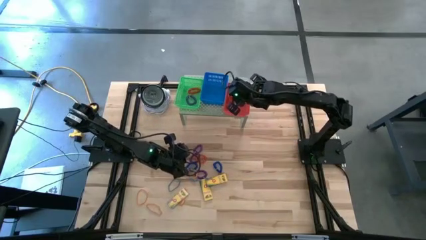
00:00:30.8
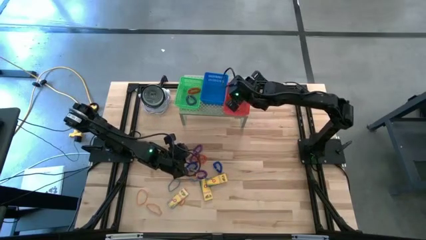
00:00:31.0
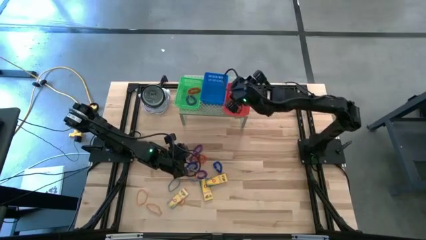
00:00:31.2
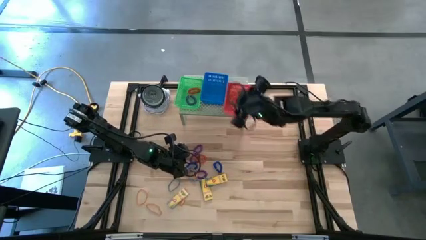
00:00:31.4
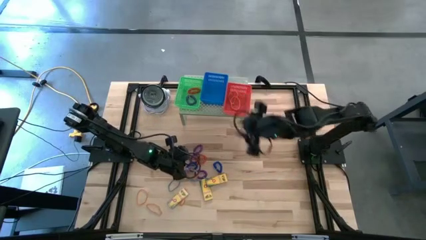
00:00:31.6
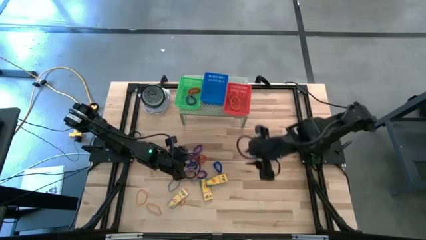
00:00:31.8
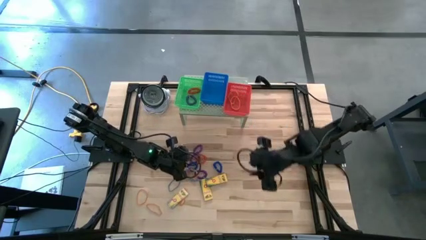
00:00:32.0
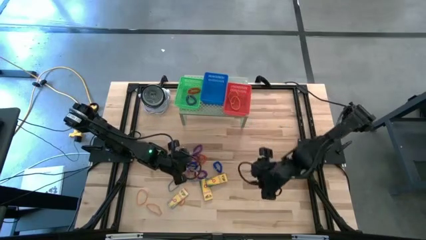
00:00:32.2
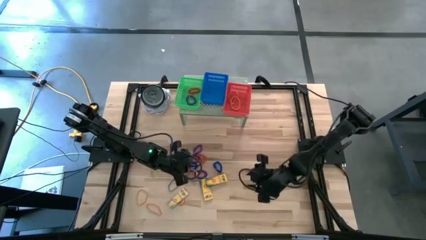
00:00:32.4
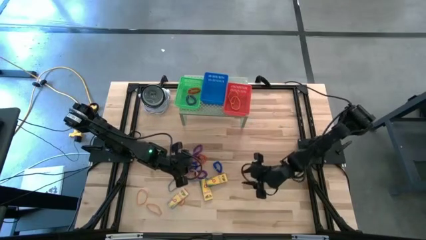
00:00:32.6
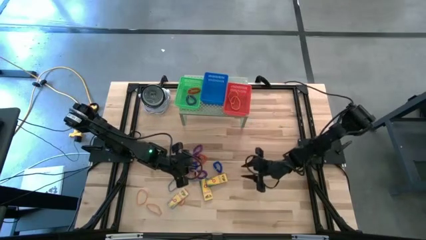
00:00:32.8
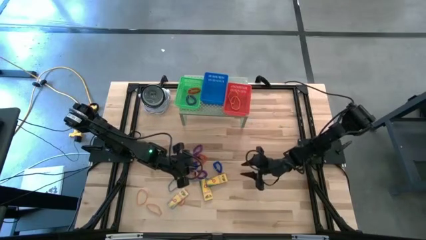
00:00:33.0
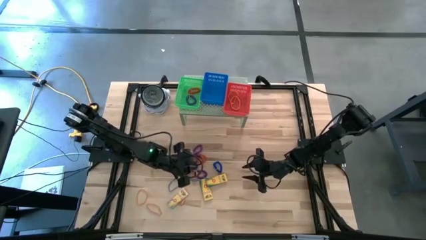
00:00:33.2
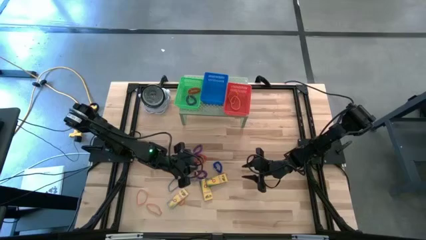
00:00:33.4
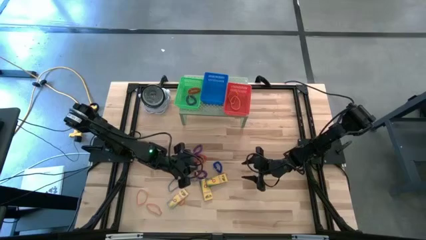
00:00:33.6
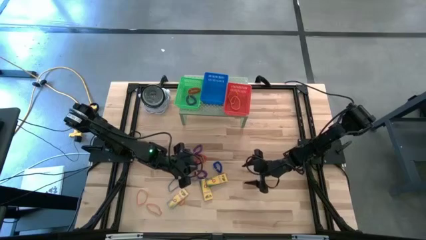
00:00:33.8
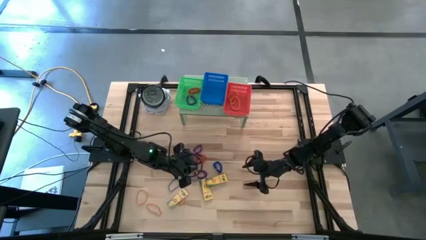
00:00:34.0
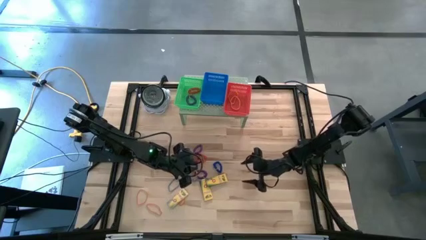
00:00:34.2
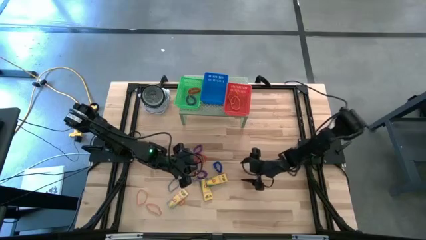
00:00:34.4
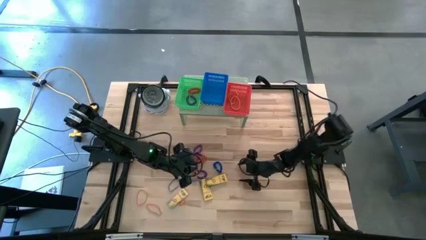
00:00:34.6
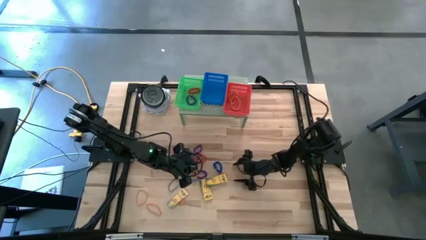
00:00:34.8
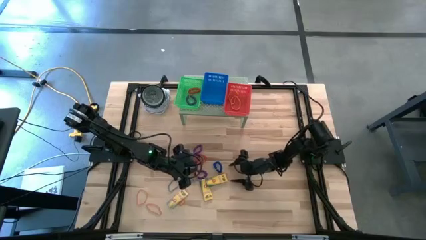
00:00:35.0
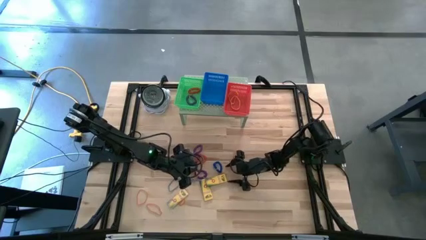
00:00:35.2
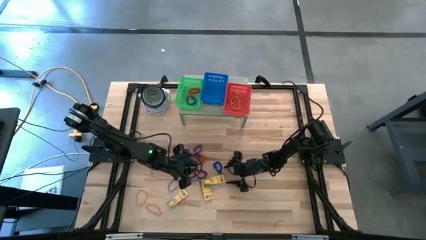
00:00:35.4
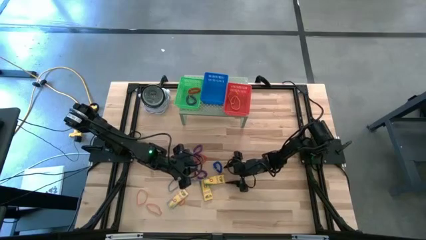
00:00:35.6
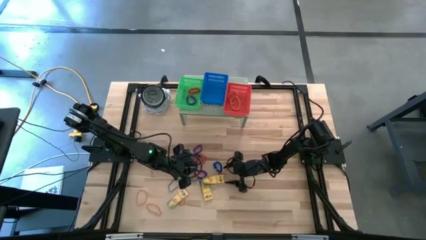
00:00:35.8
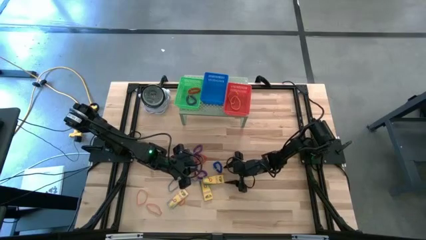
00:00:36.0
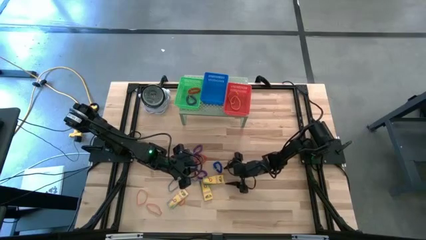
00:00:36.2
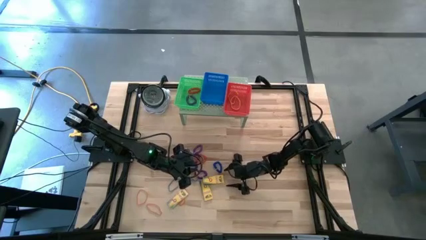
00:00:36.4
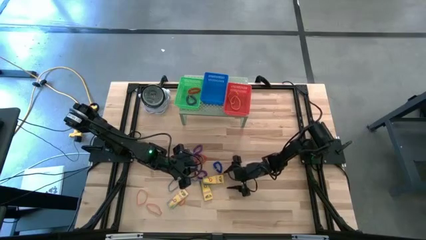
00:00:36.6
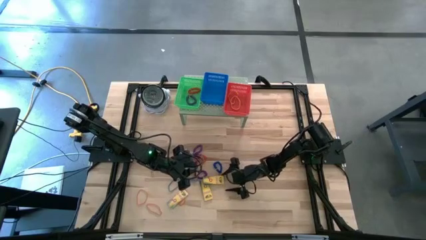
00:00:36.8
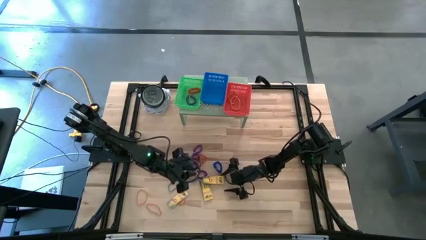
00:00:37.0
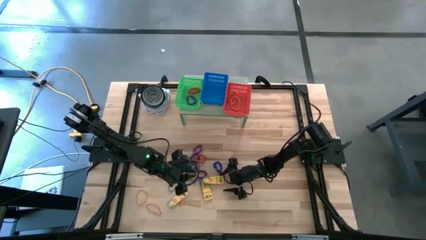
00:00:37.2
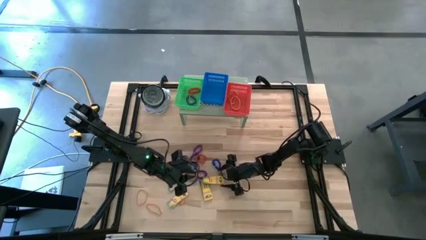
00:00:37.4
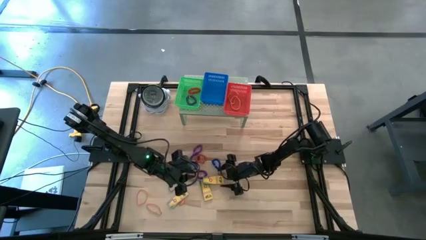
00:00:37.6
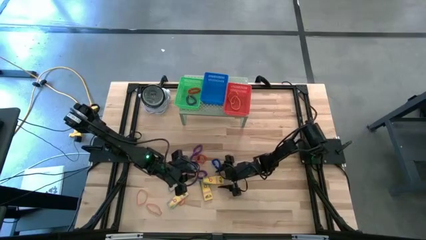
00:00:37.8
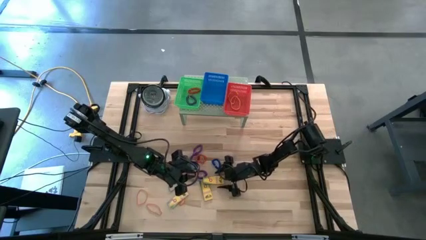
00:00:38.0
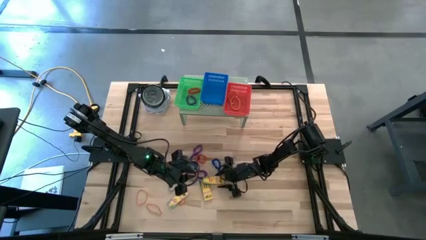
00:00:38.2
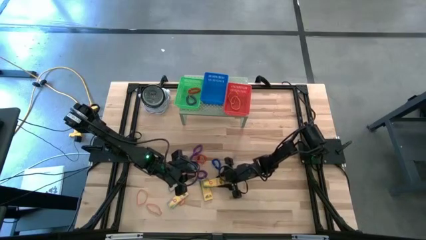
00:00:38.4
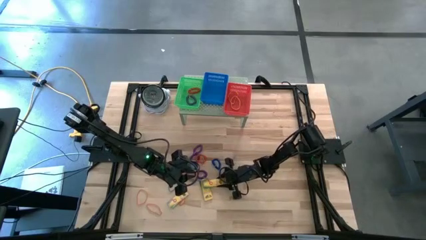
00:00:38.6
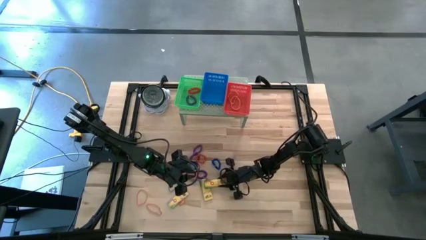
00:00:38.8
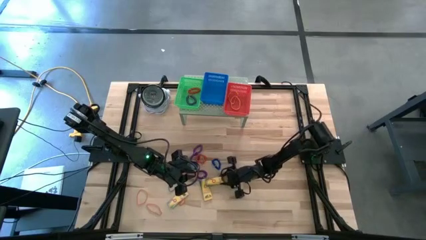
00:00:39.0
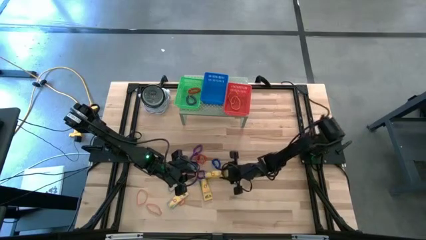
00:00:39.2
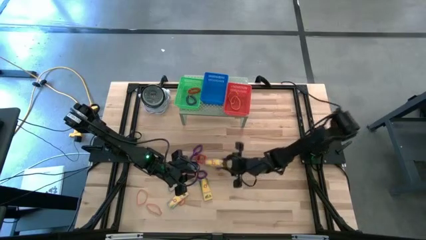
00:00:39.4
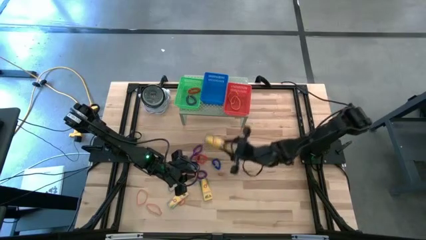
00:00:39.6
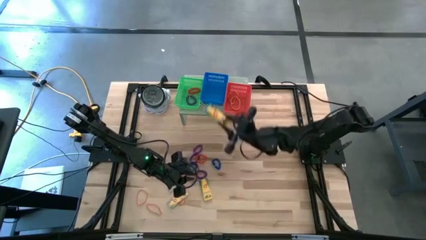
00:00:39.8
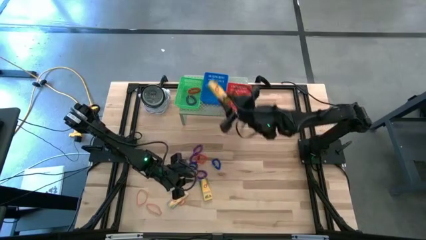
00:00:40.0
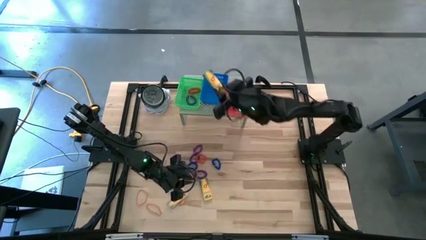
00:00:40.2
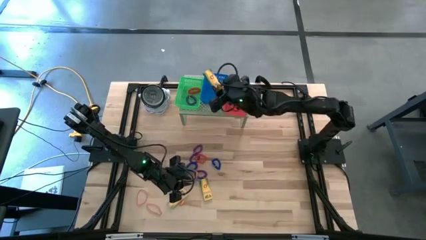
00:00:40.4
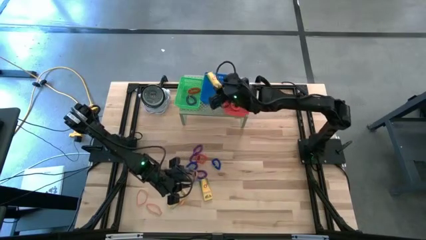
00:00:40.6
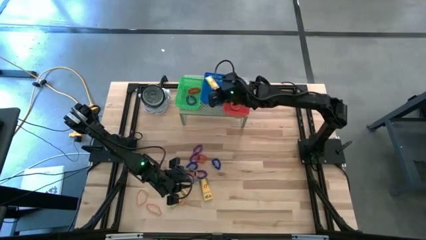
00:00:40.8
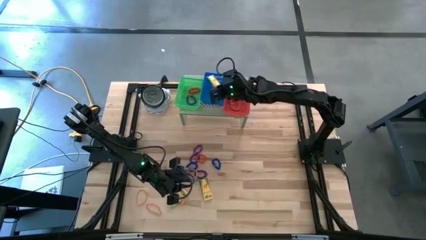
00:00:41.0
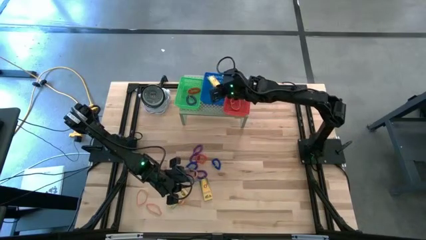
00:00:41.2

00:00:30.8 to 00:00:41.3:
Task: Pick & Place Office Desk Supplies
Put the yellow crayon box into the blue bin on the shelf

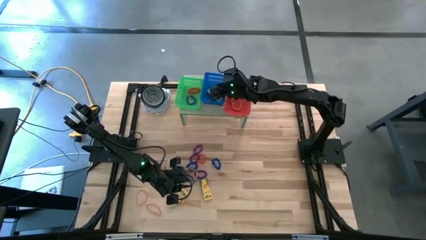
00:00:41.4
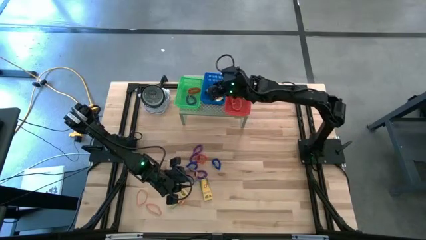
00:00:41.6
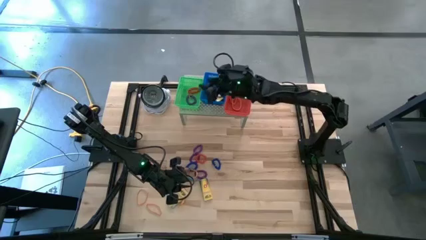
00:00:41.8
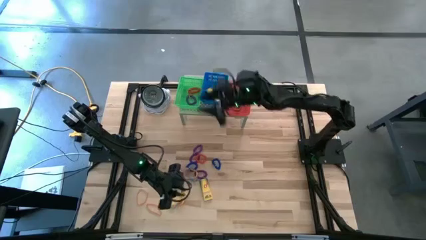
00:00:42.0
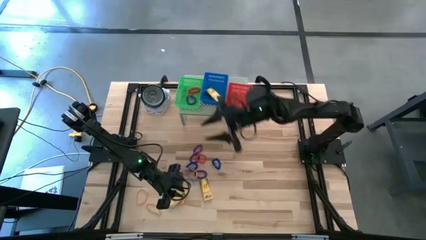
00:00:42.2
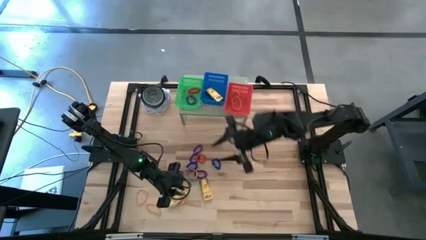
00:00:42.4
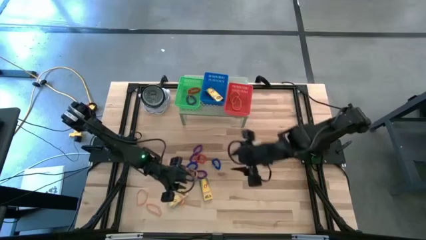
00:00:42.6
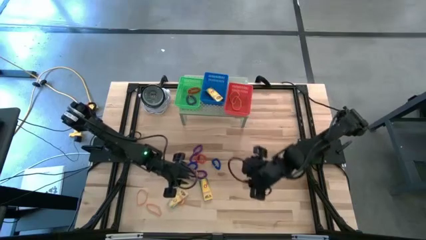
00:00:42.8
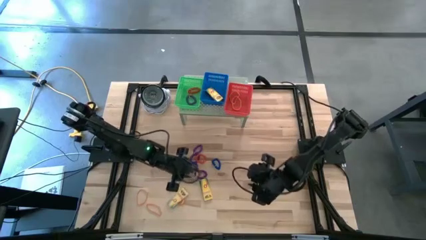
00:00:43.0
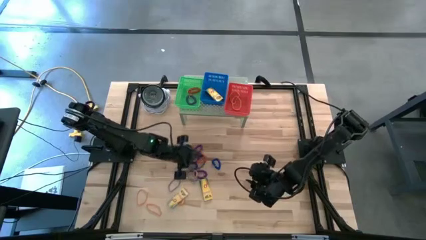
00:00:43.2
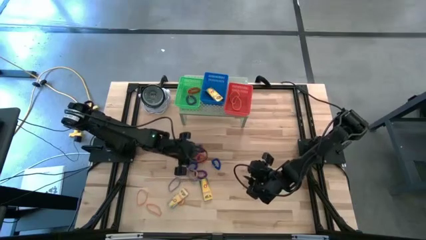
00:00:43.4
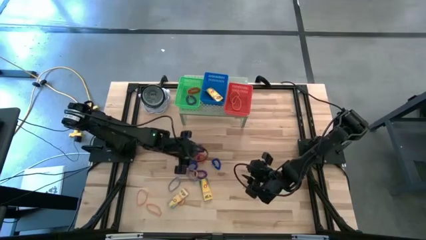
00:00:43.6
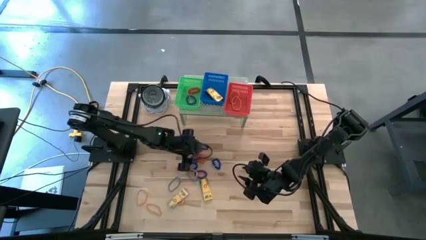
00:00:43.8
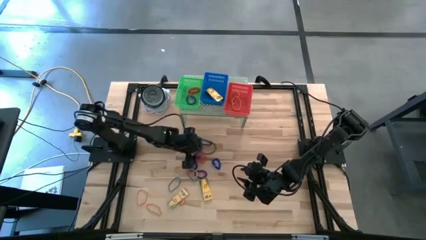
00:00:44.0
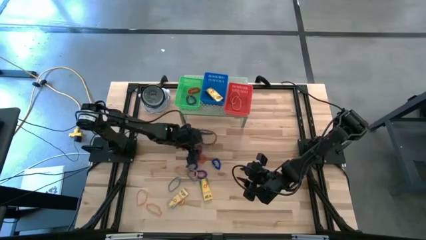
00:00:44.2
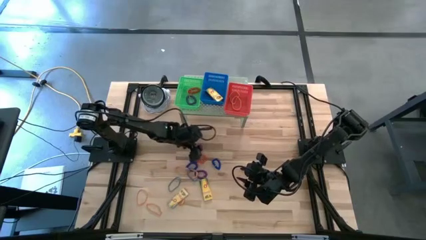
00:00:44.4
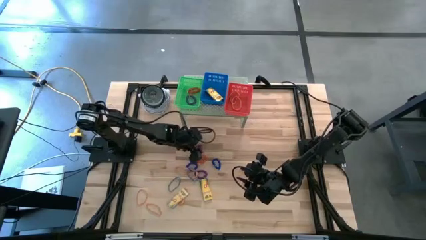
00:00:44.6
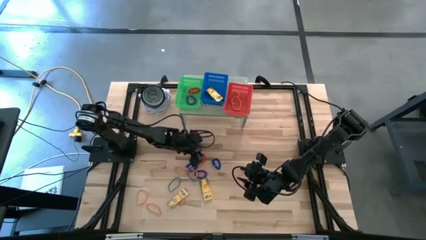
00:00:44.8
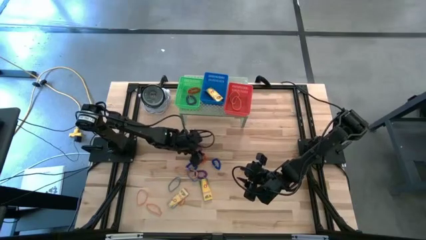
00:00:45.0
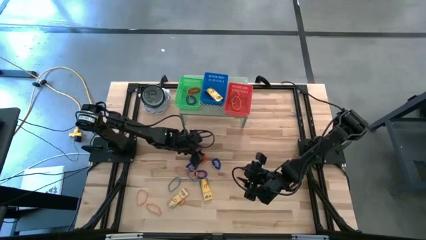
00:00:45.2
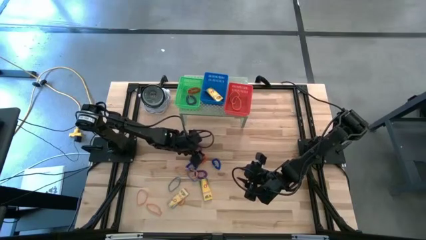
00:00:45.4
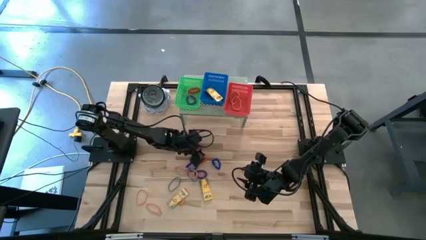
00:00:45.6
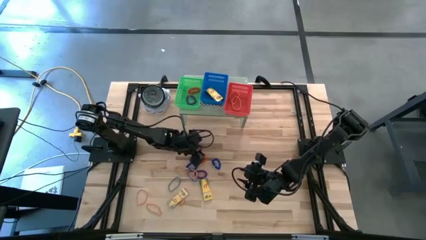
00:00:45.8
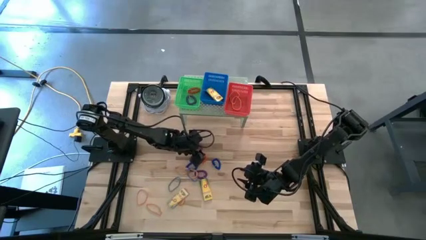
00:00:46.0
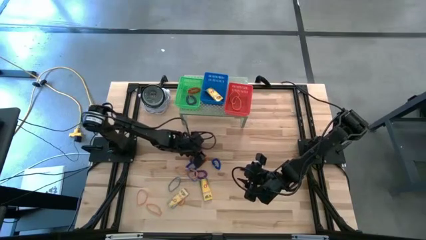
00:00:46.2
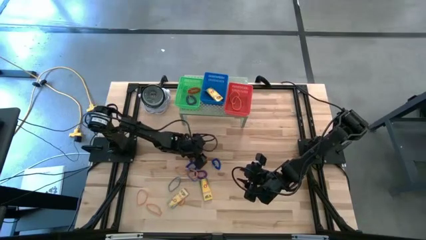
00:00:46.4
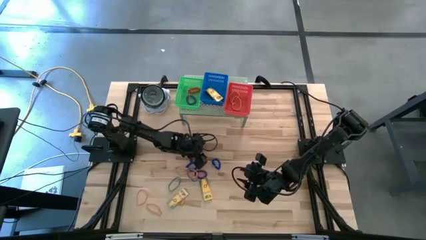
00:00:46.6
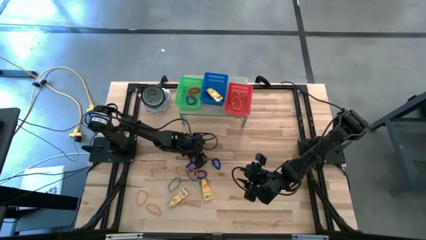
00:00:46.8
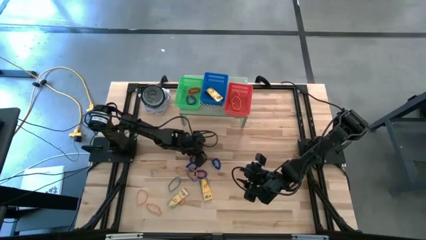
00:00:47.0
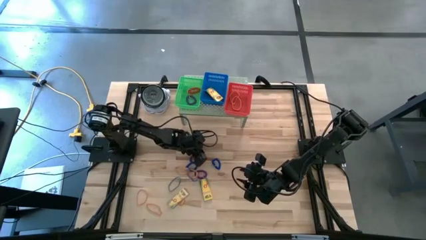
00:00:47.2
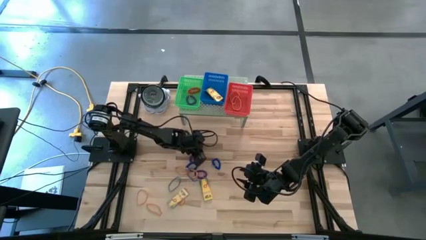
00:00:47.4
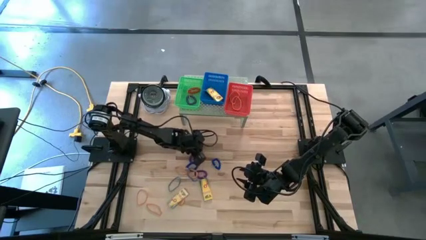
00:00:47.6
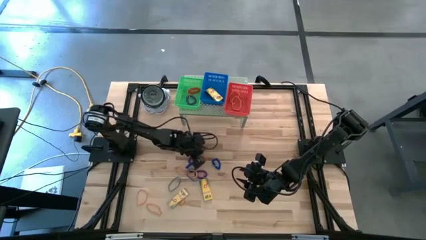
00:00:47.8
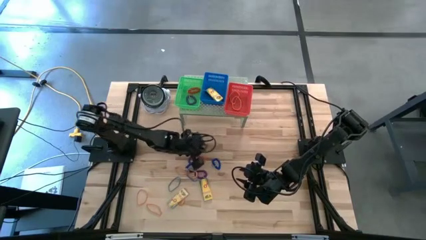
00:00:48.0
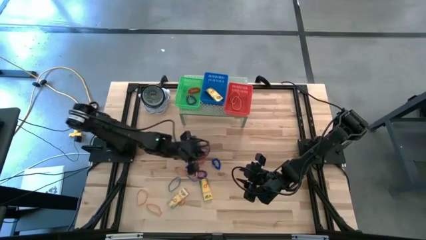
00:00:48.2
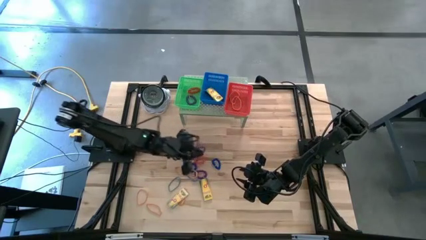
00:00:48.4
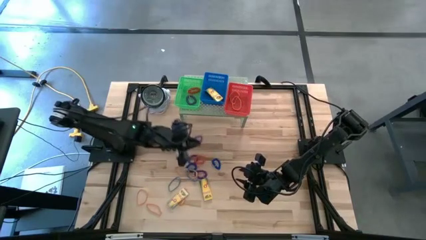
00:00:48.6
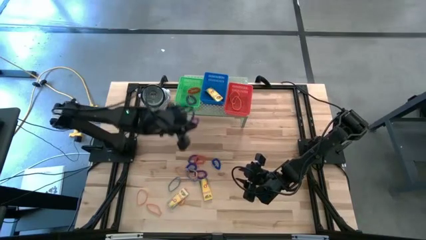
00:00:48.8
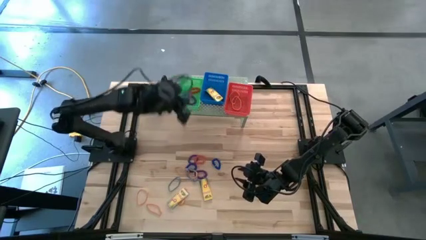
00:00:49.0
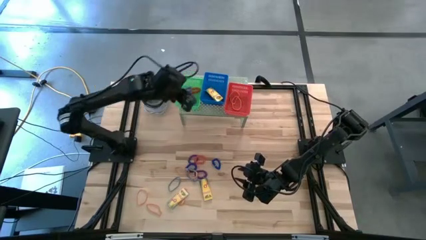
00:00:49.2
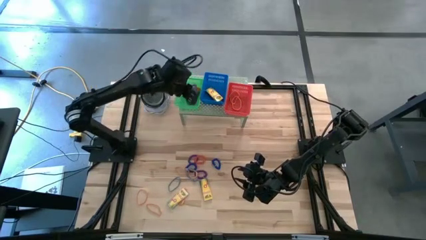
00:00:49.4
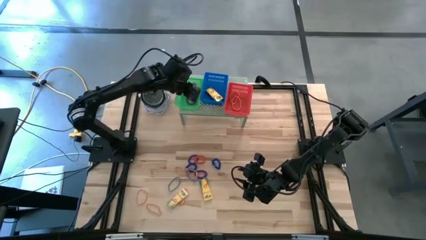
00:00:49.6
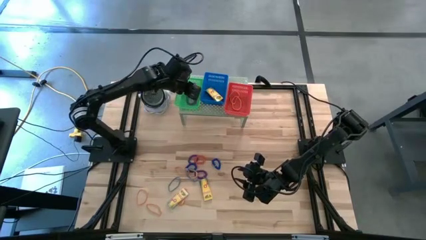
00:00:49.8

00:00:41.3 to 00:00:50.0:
Put the violet spring keychain into the green bin on the shelf
